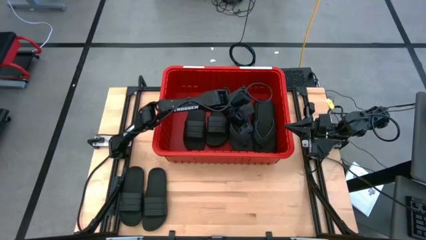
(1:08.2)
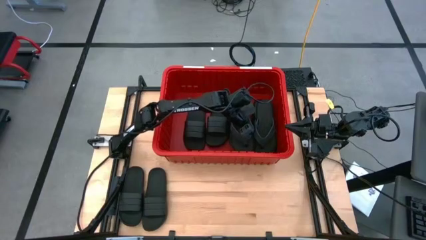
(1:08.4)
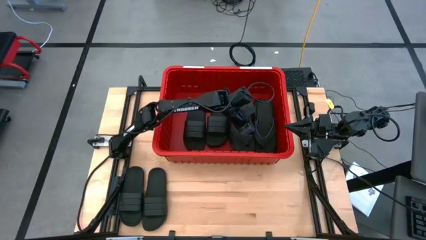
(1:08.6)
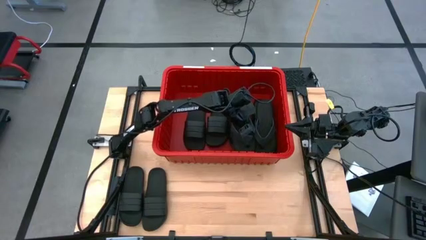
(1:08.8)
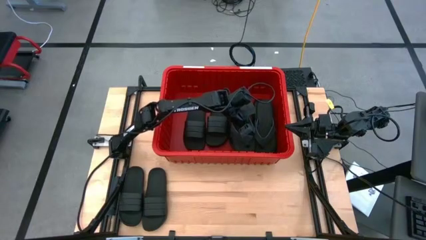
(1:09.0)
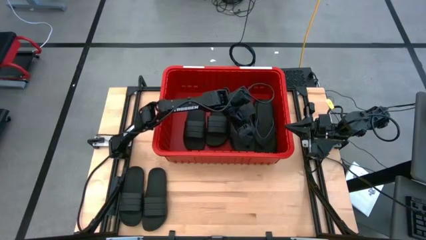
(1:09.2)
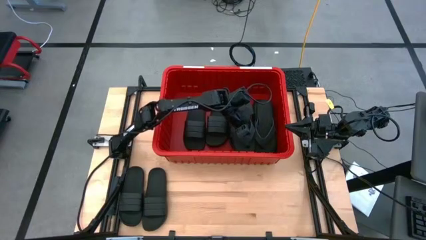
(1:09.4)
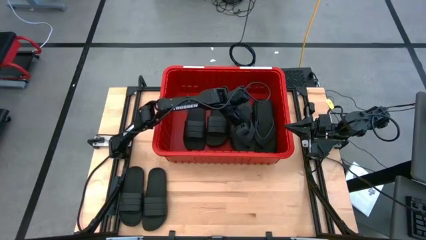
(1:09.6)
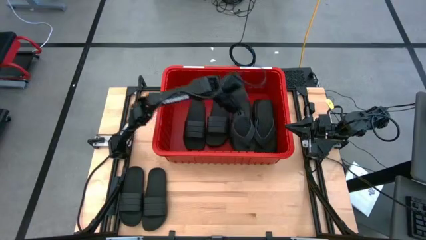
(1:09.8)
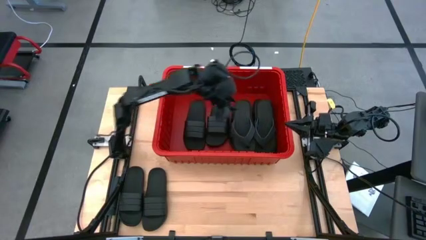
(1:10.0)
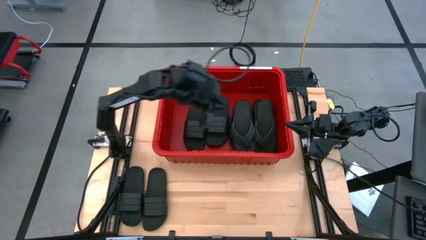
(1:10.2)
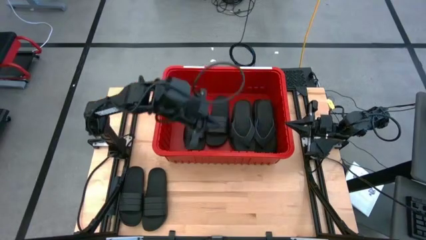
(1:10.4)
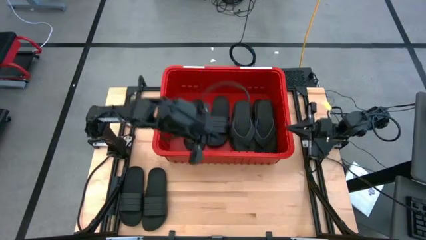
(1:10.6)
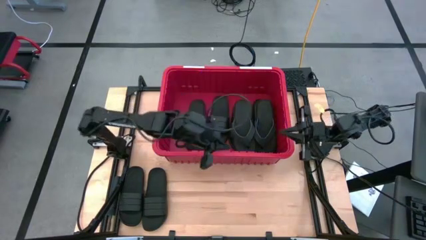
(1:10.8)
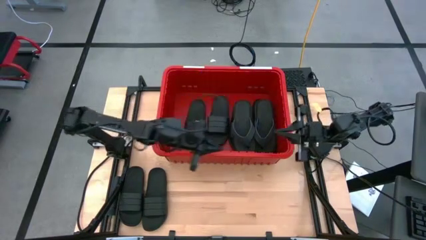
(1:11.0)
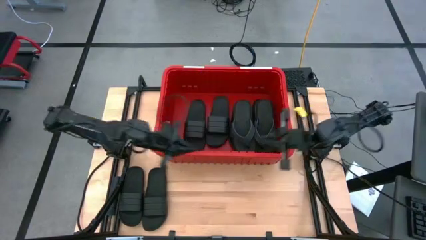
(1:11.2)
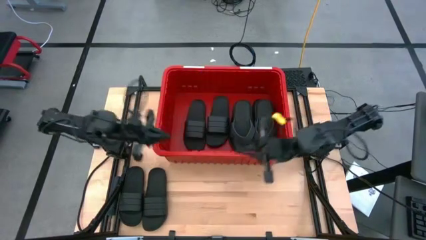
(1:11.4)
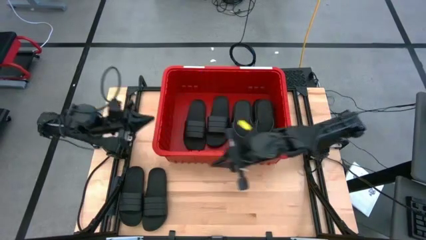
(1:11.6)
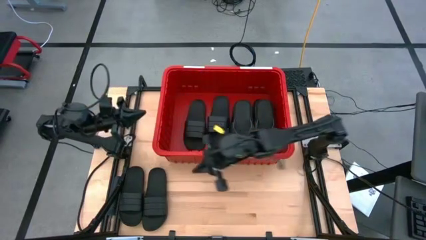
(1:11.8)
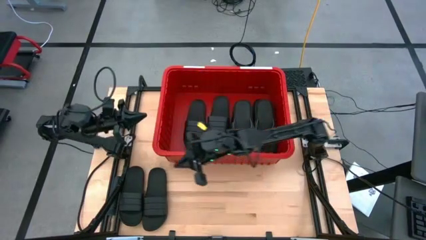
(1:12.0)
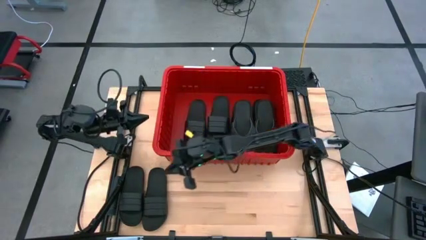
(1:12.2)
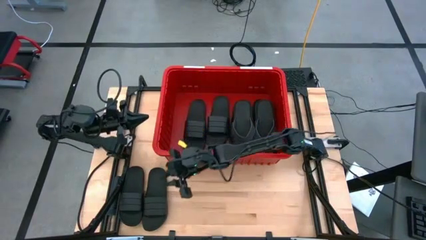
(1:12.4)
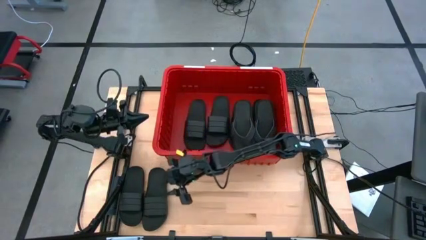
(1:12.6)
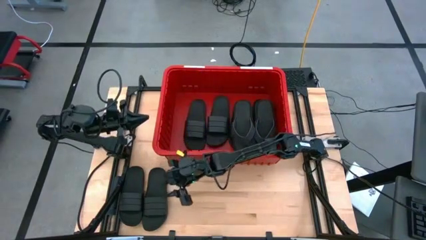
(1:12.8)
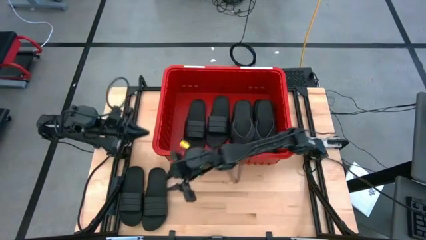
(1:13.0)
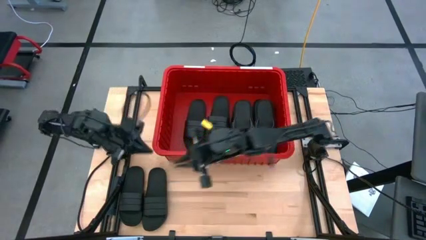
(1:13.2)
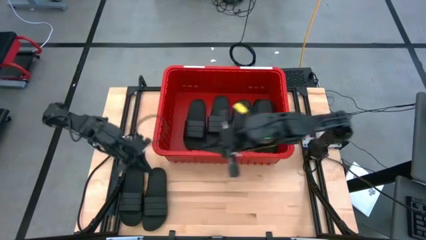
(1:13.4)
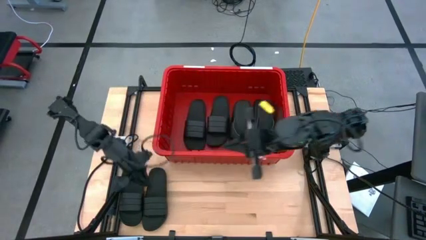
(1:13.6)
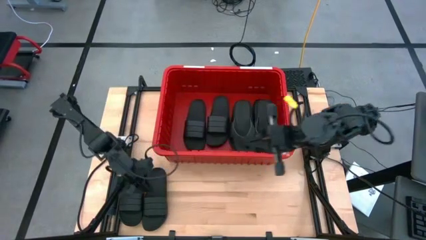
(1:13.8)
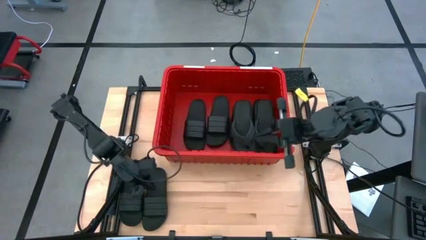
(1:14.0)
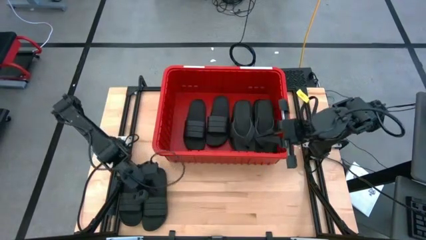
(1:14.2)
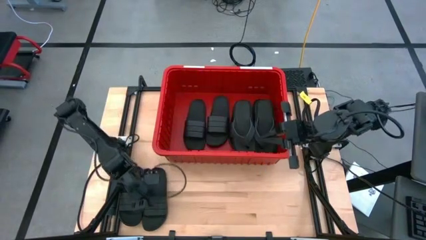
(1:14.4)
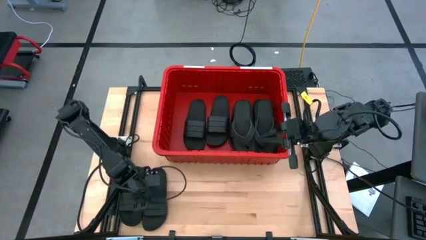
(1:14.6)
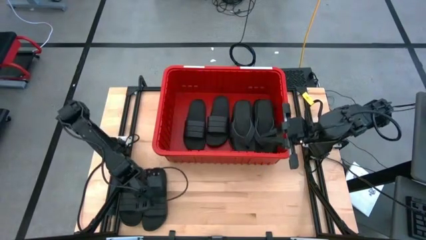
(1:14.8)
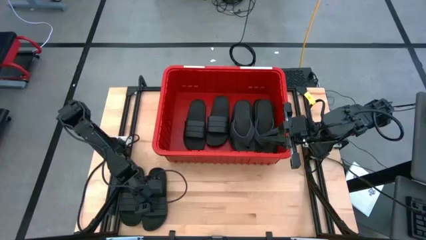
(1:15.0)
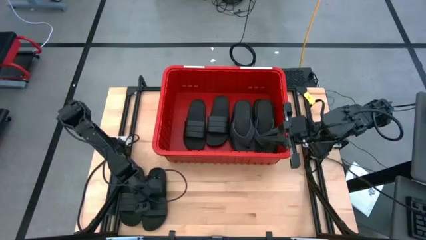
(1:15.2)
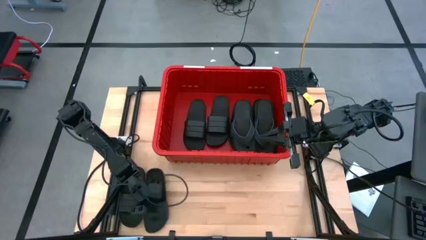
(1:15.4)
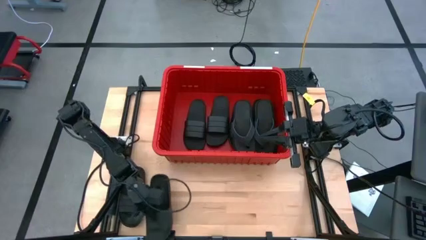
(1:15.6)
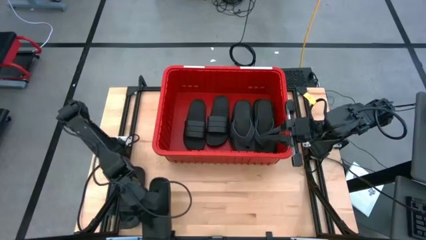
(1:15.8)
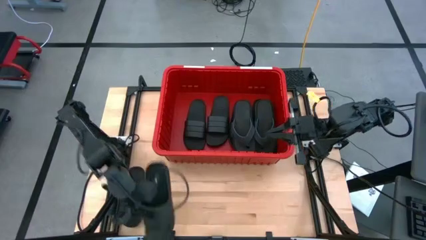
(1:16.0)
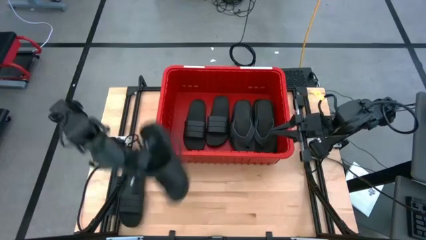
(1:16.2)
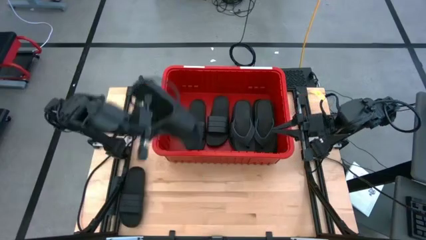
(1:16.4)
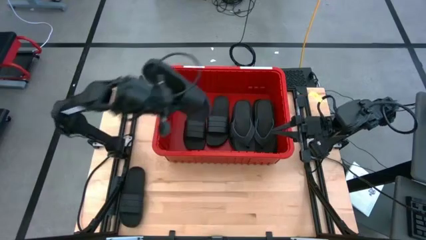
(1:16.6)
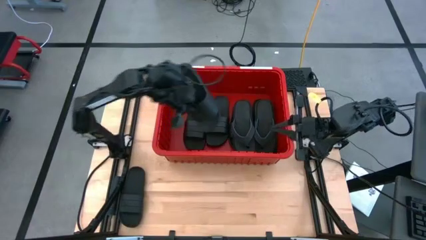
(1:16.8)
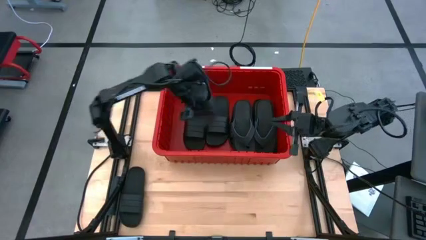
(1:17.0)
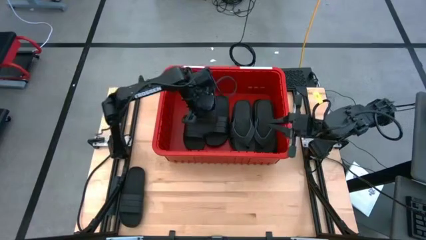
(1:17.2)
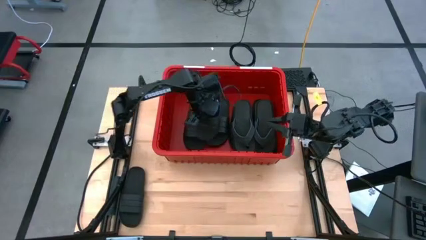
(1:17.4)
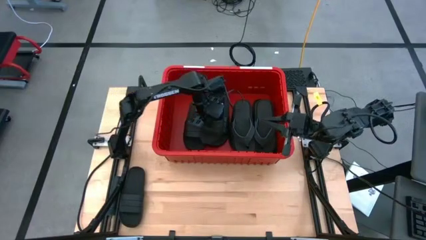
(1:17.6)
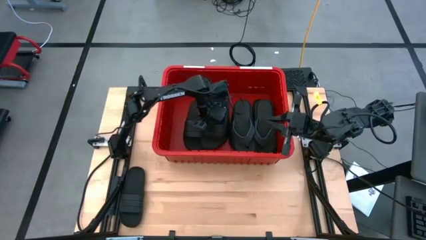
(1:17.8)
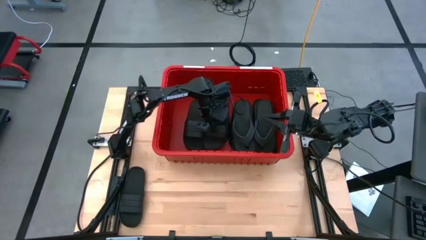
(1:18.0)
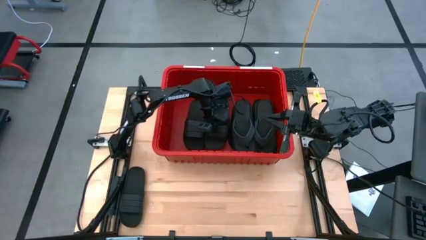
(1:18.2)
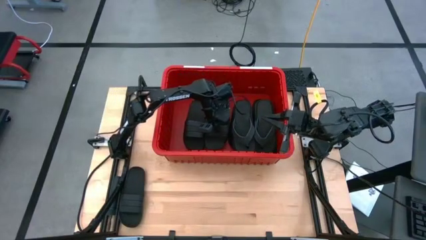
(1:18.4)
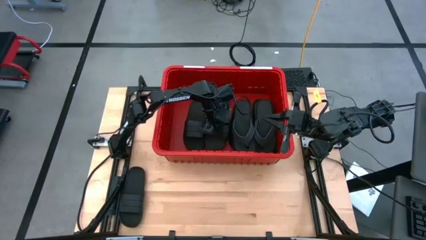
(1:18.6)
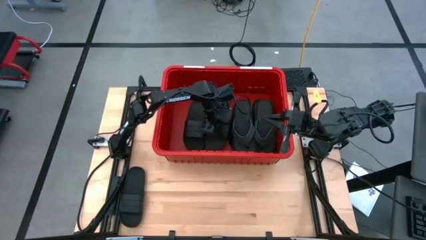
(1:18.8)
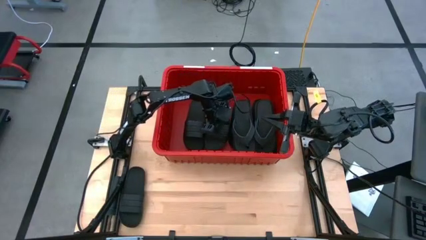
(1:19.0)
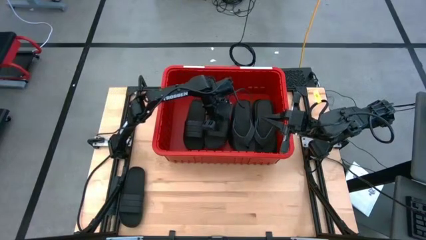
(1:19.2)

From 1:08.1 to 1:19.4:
Task: Pick and place slides into bin
Put the right slipper into the bin

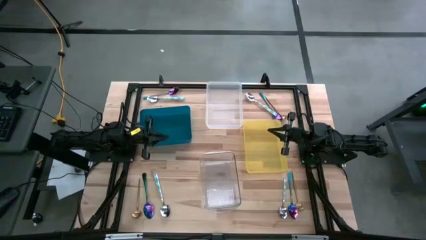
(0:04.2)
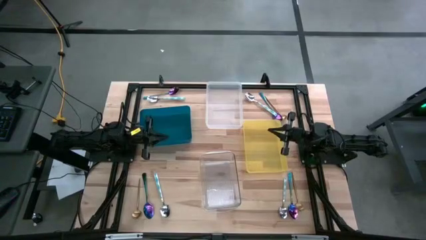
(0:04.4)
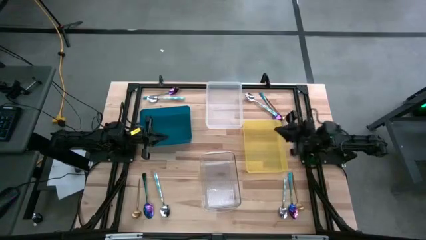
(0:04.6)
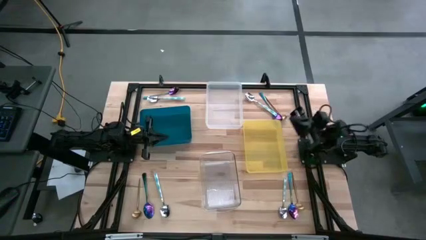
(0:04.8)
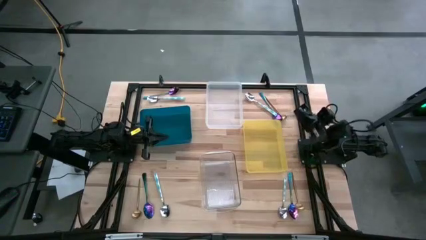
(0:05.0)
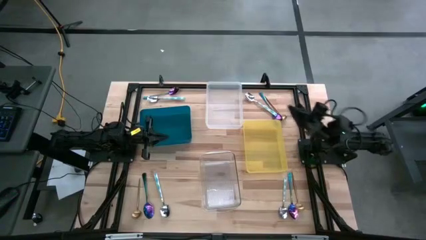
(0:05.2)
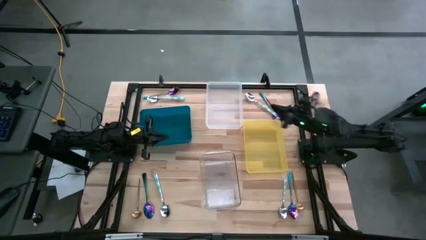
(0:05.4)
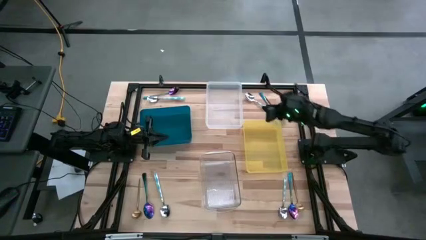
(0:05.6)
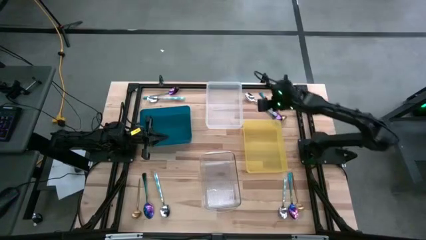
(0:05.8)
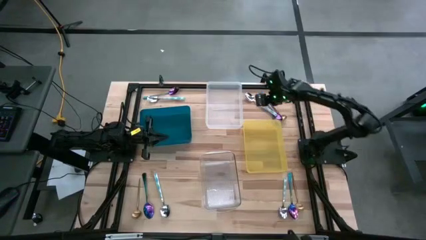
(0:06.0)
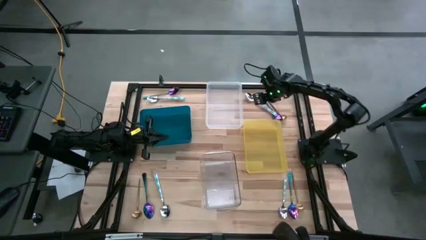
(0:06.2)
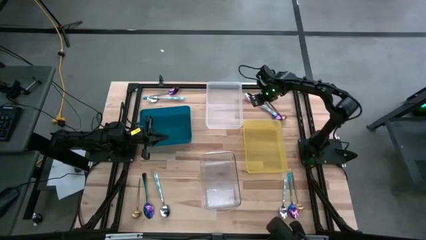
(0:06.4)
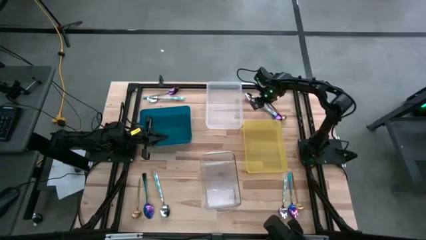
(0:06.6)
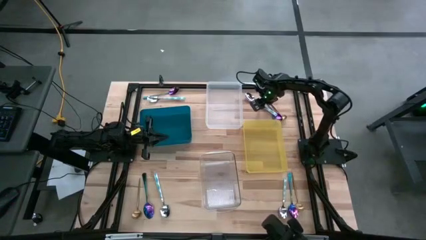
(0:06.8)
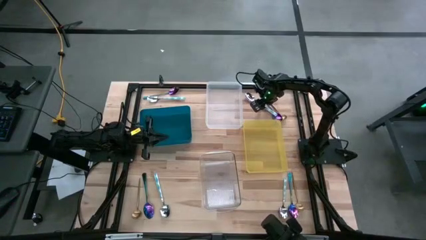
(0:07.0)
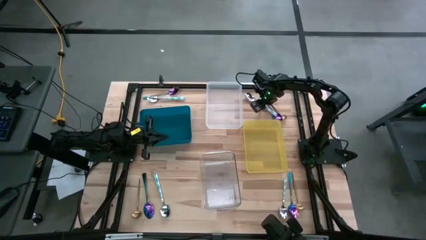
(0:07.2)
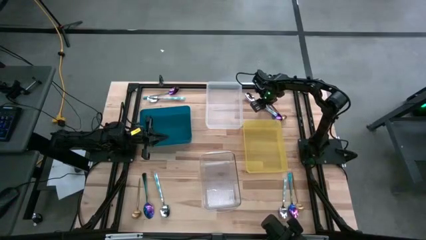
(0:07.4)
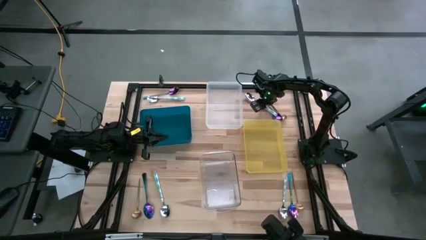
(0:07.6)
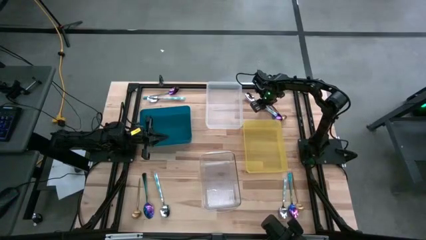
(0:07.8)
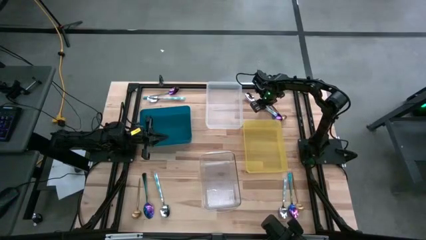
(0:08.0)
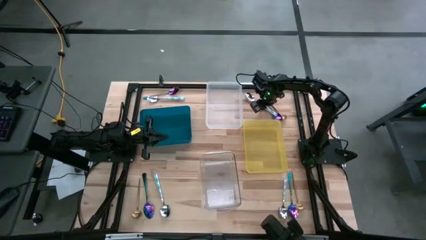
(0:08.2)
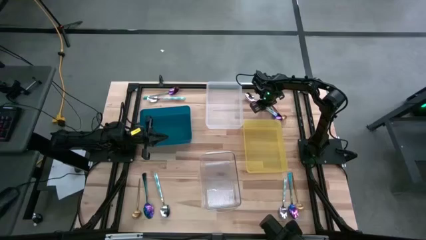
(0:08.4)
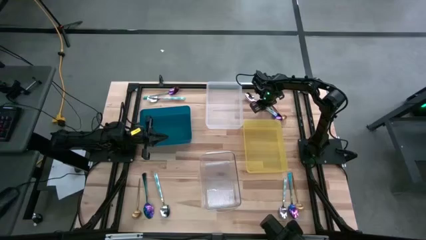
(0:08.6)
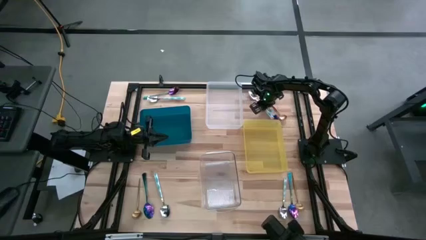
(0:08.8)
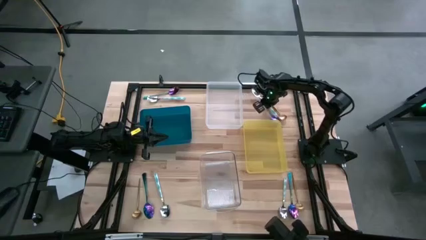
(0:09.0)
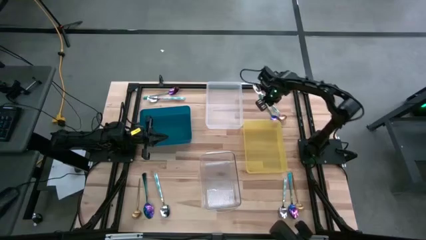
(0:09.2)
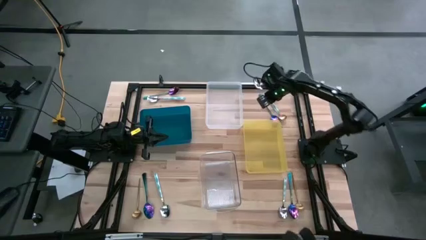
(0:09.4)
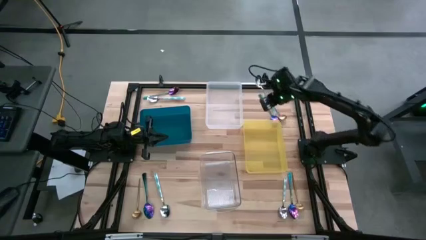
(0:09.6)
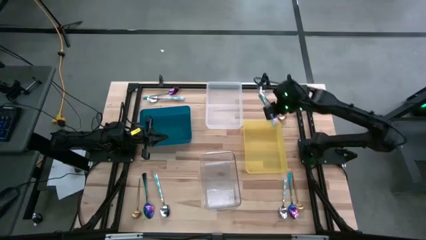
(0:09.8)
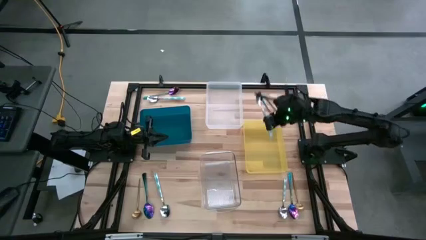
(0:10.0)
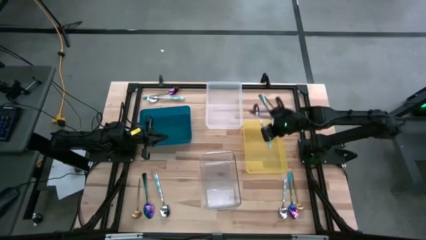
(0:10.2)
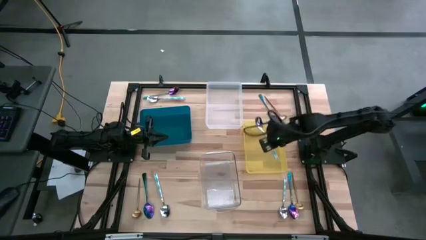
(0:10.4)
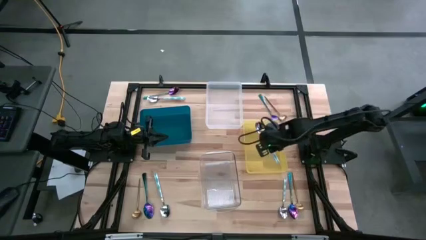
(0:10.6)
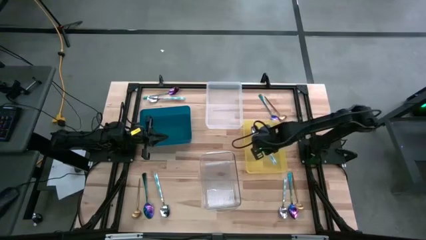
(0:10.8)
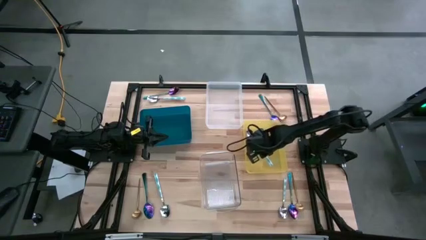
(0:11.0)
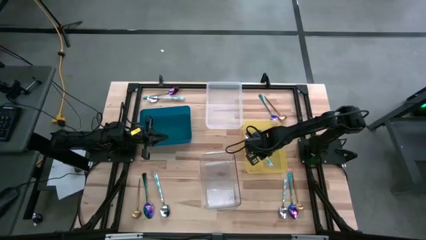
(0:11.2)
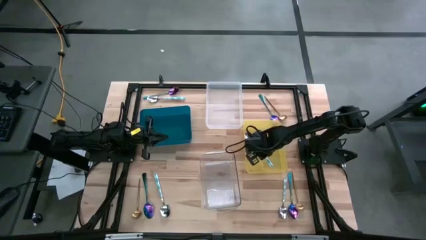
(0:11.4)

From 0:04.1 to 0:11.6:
Task: Sort silverware by color (type)
Put the white spoon into the yellow bin
